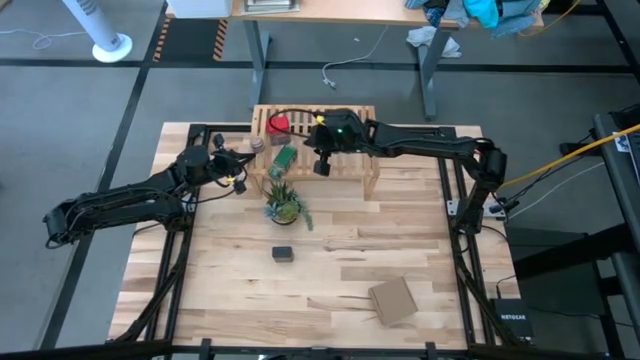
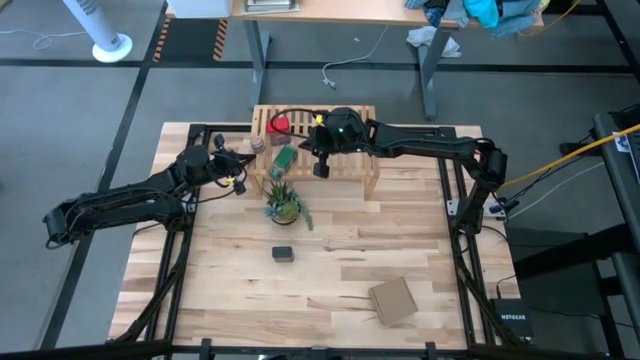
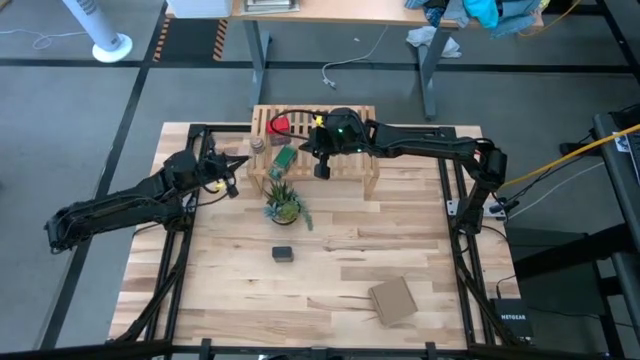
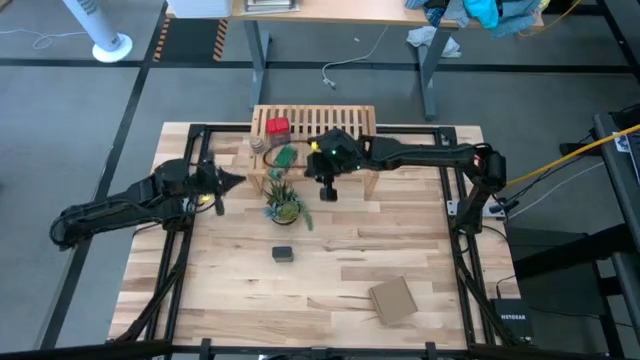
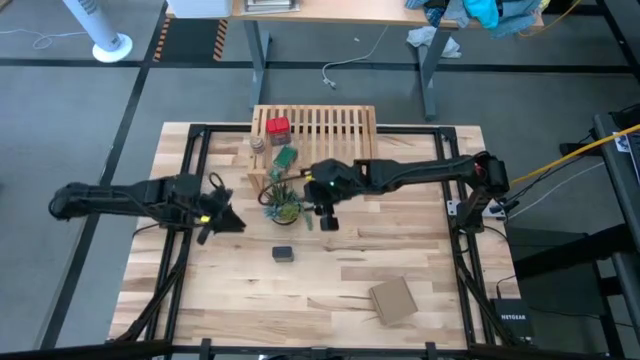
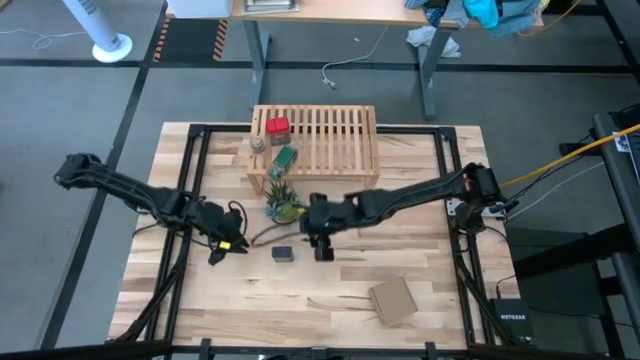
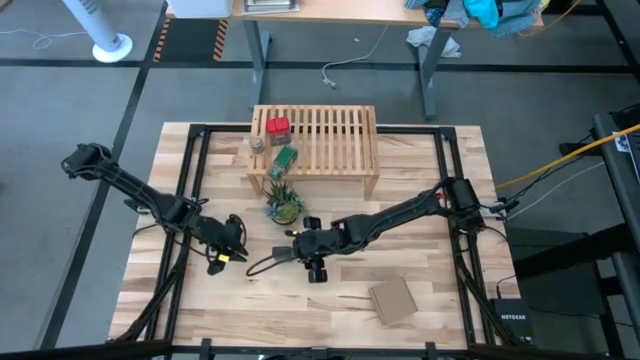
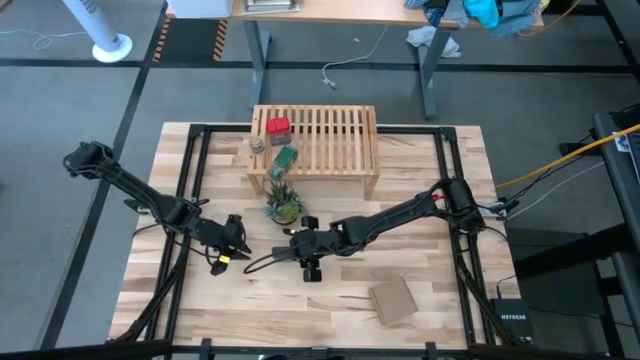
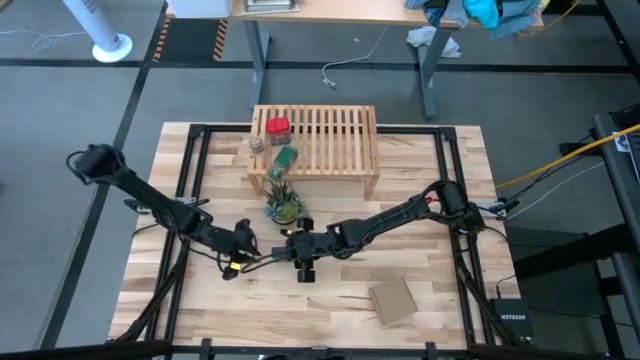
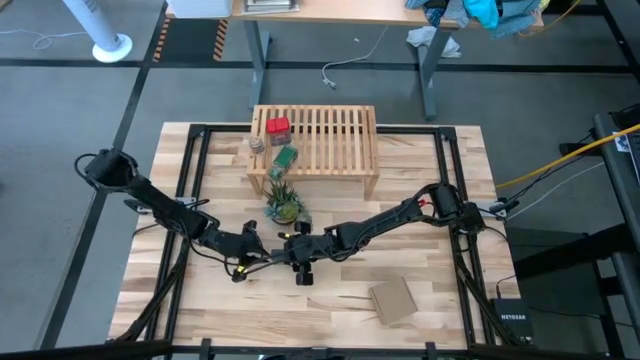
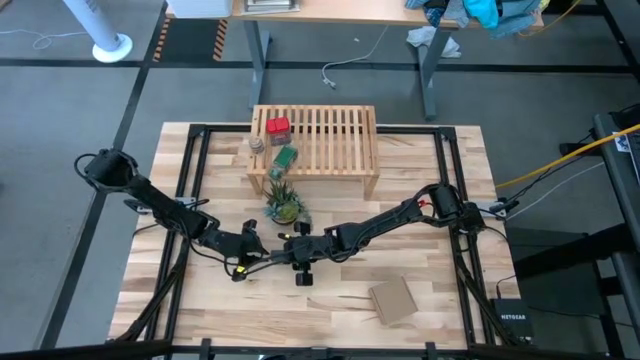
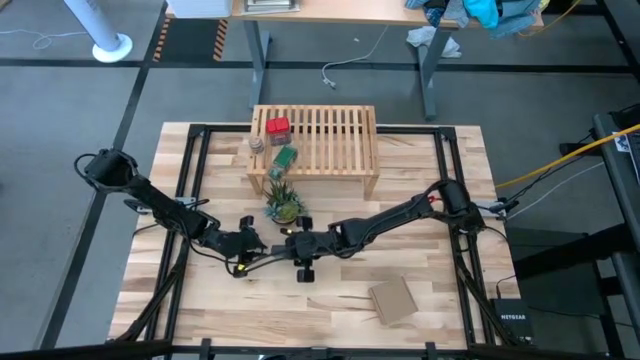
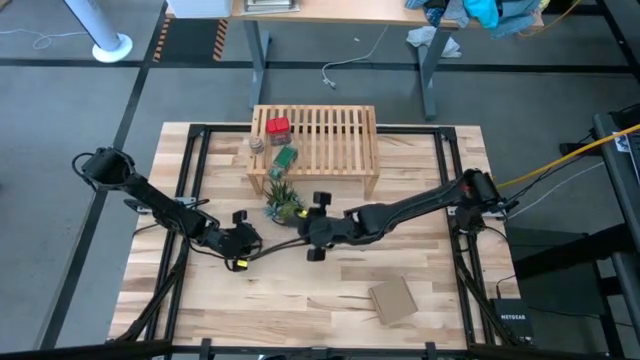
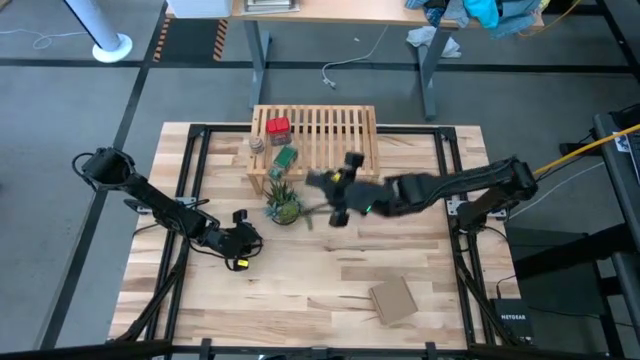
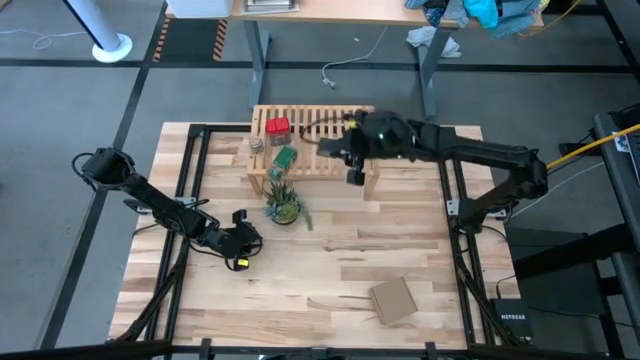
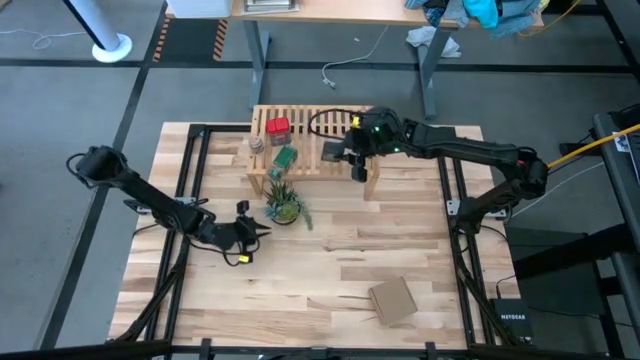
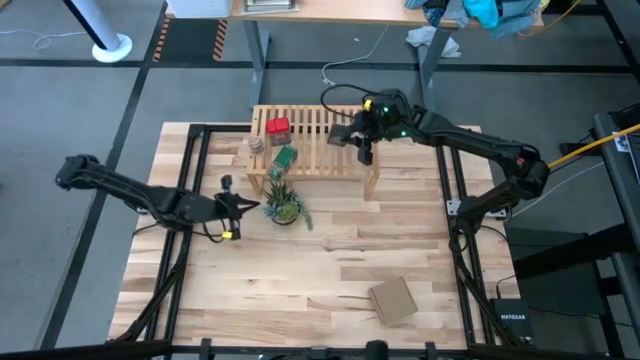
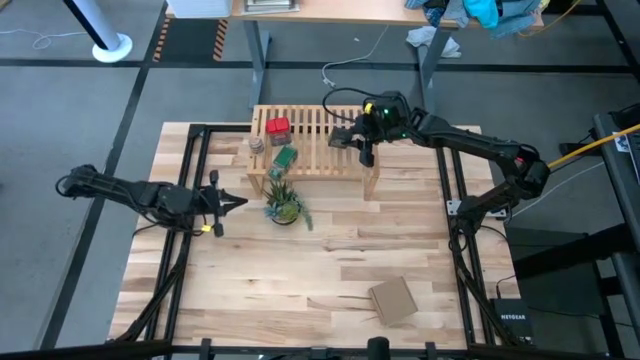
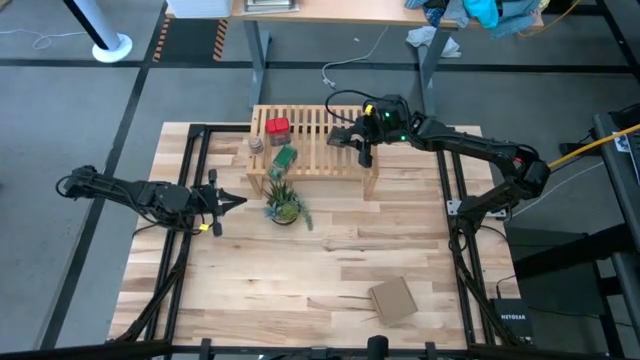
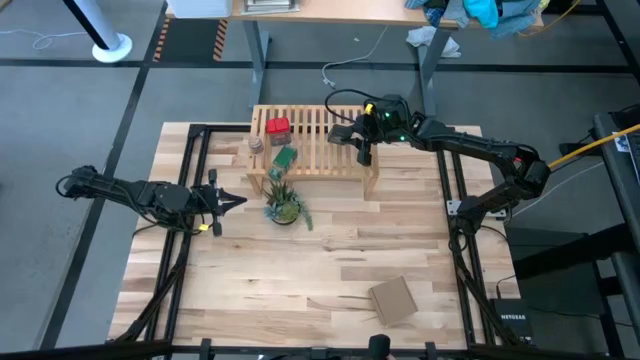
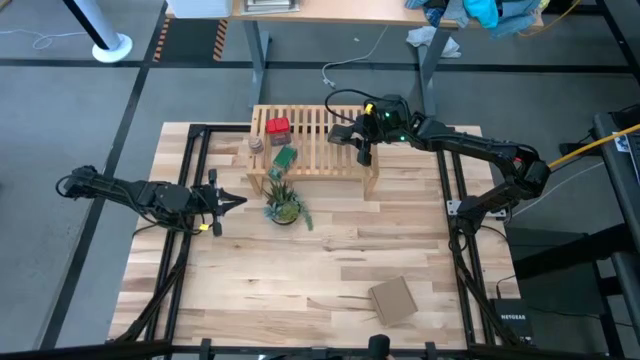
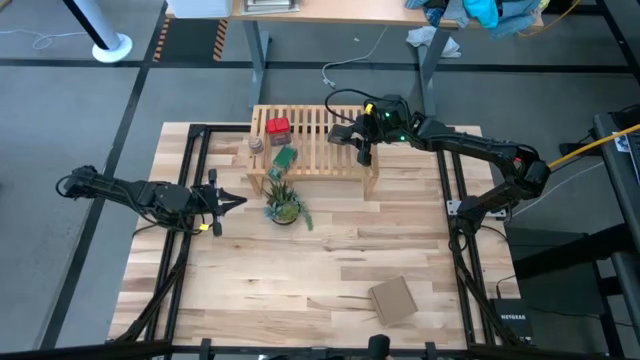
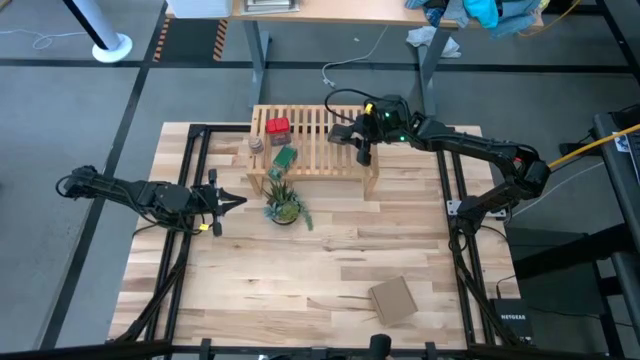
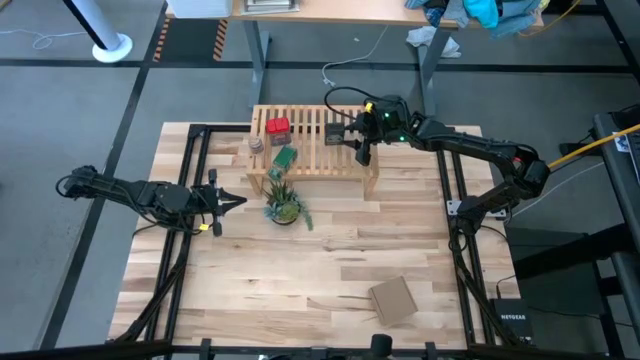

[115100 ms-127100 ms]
Task: Shelf spices
Put the black seasoning can on the shelf

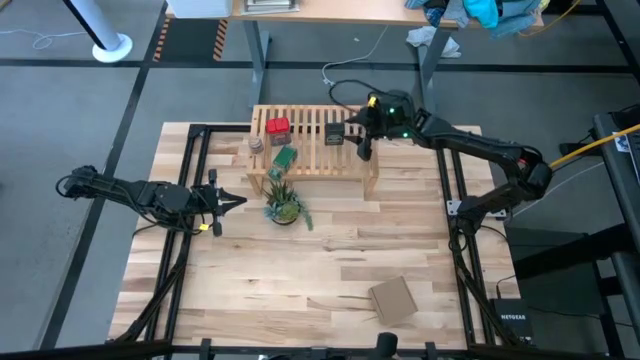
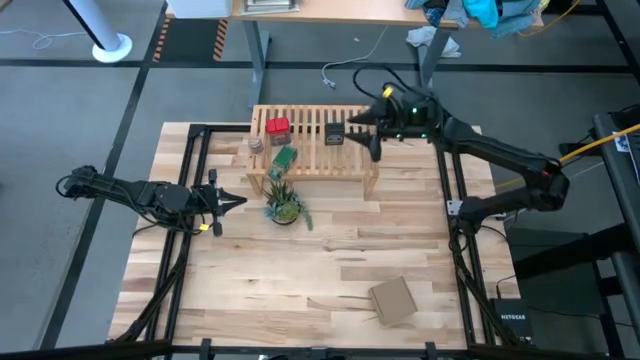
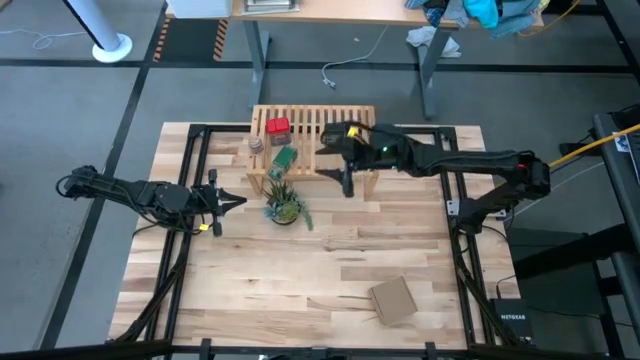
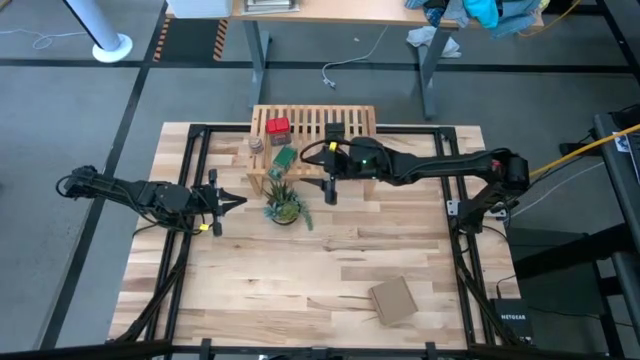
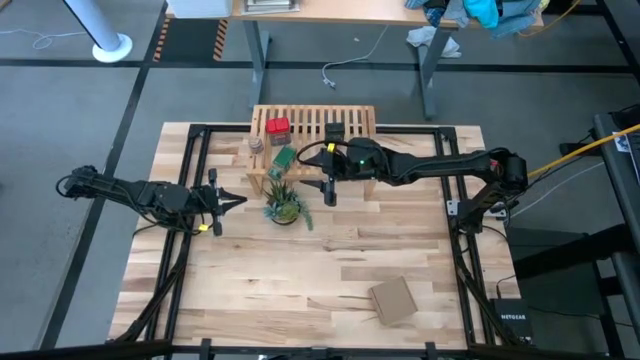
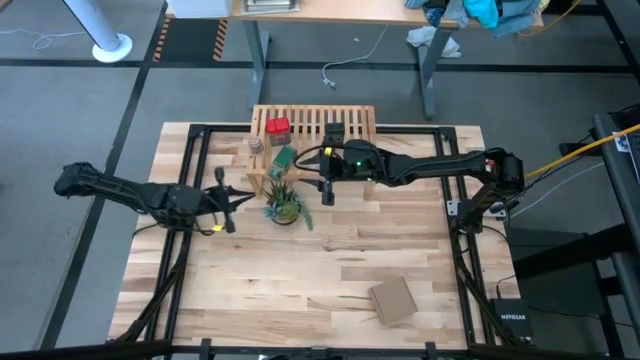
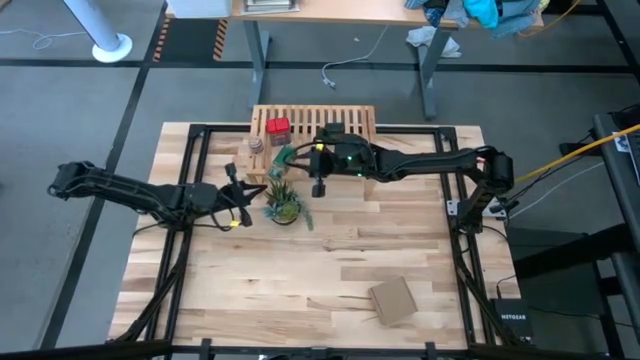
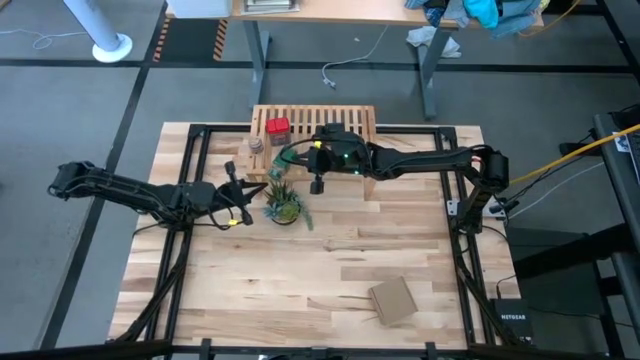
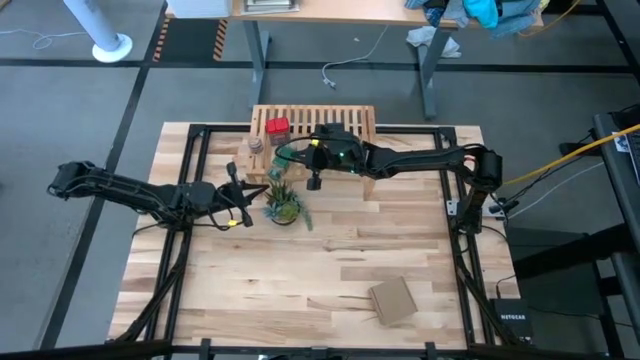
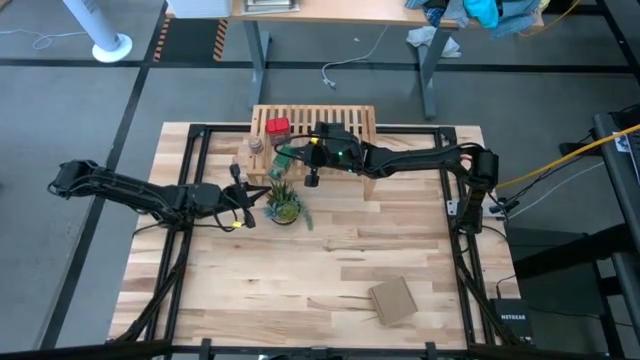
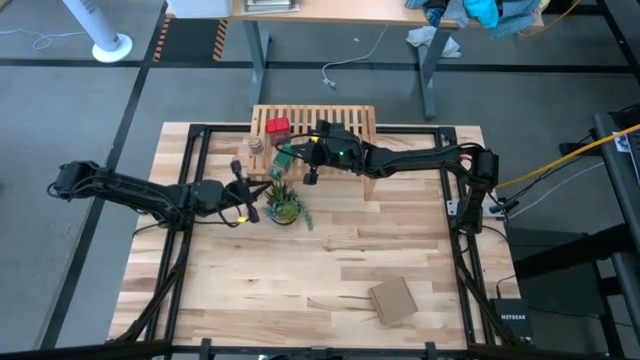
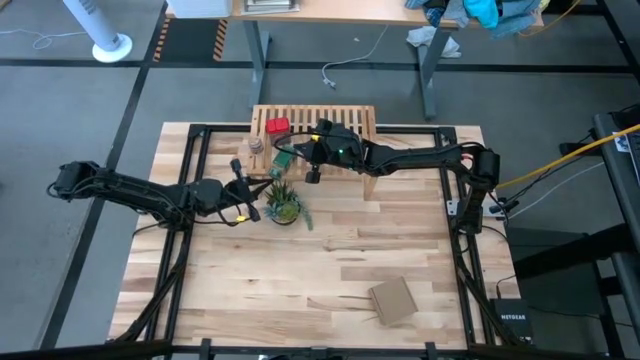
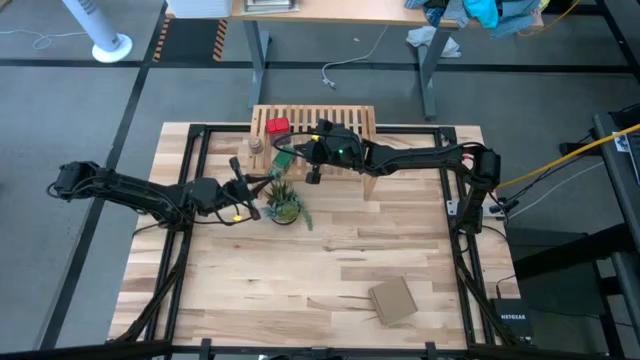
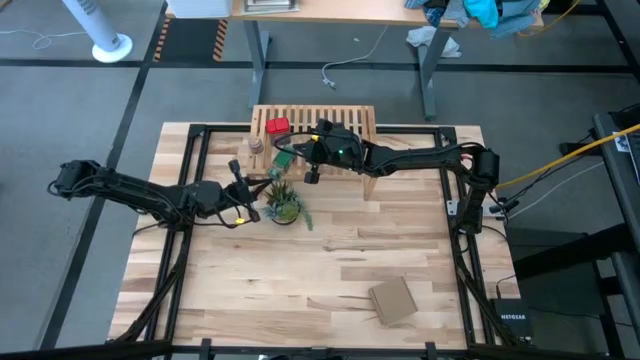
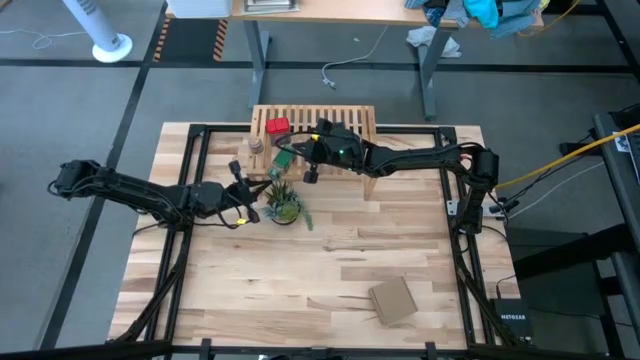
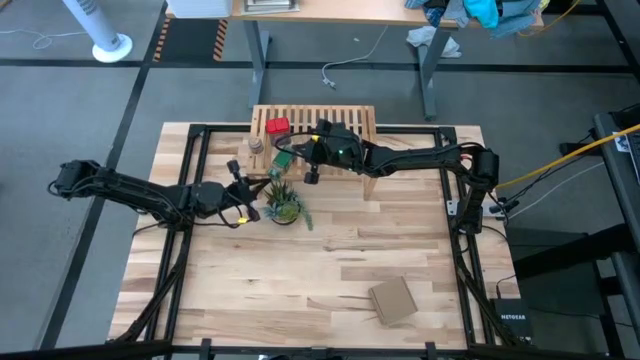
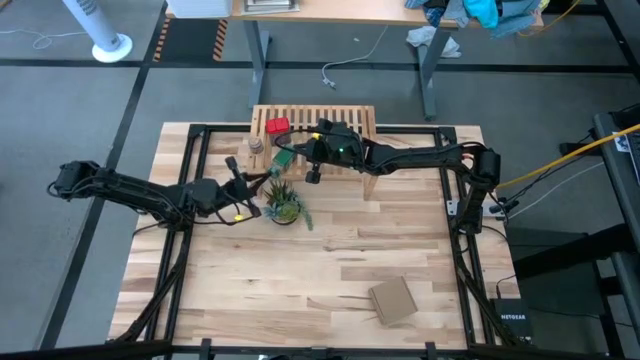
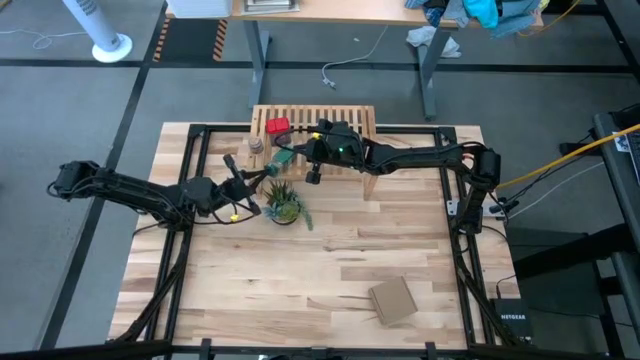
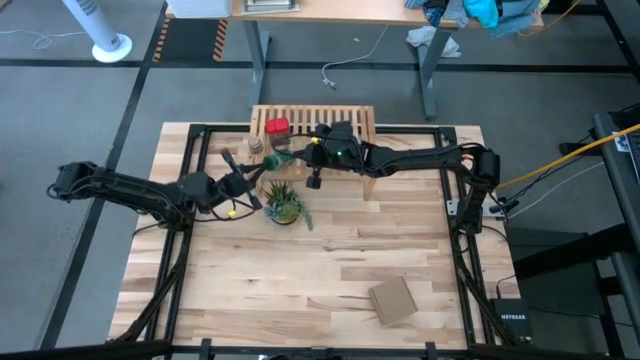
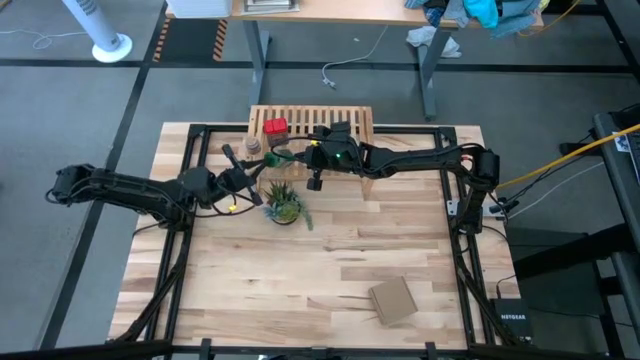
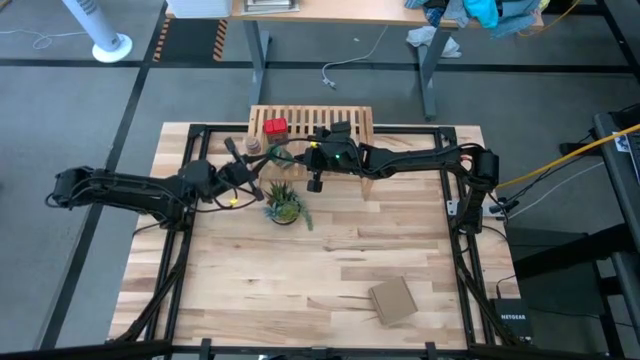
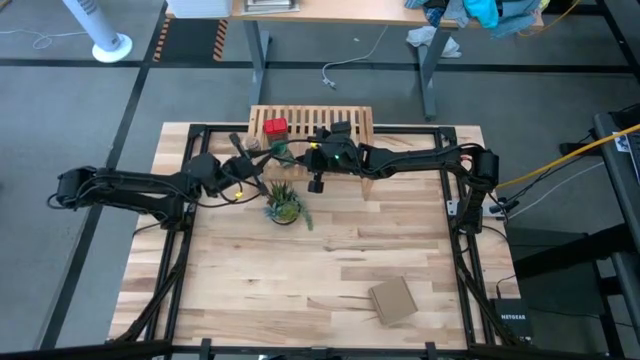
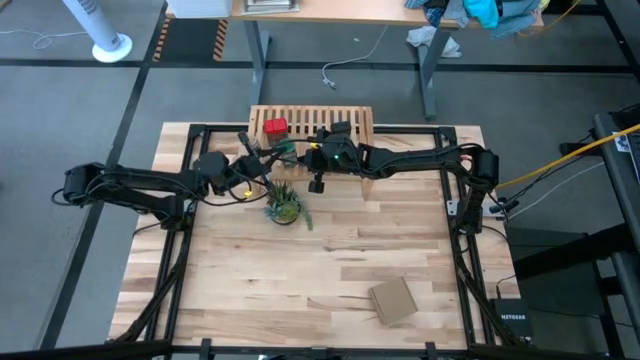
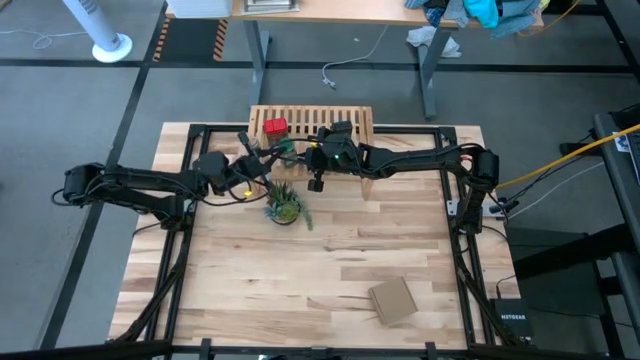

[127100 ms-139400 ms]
Adjust the green seasoning bottle on the shelf
